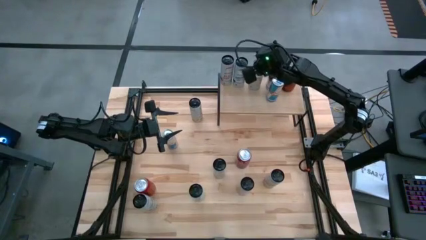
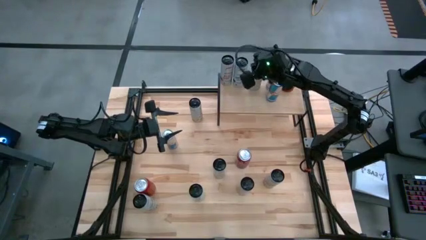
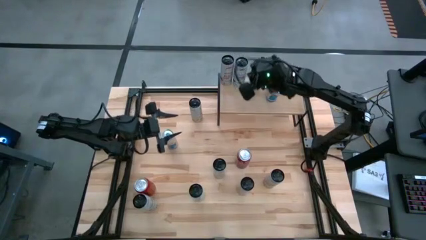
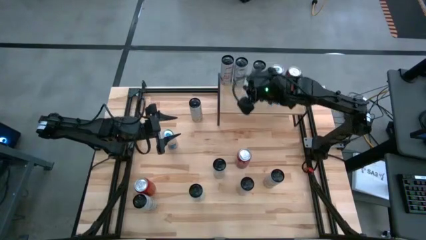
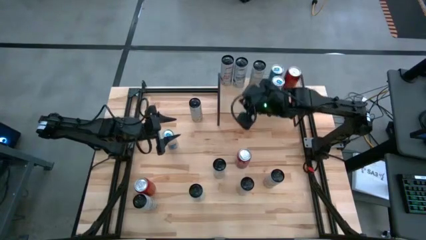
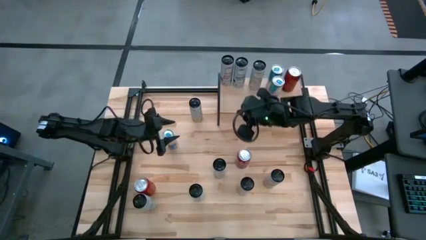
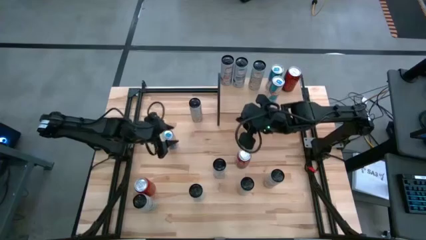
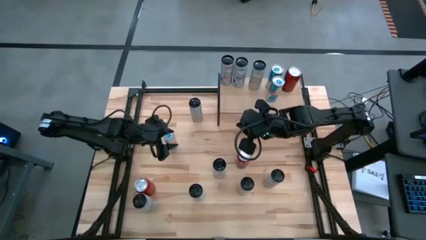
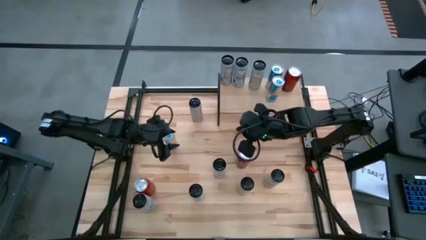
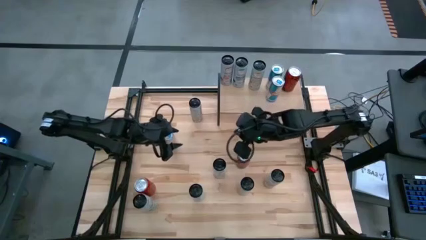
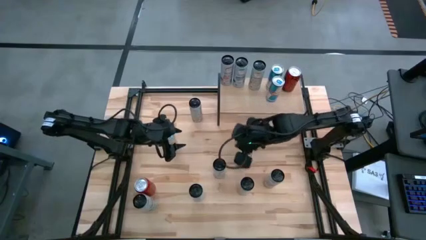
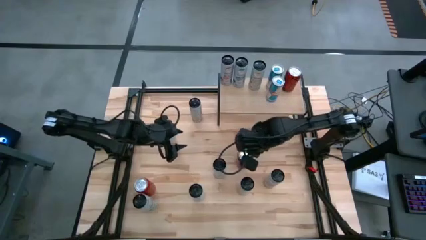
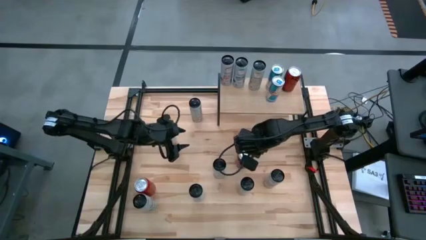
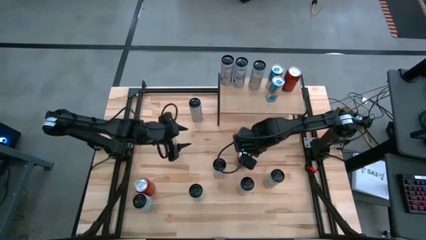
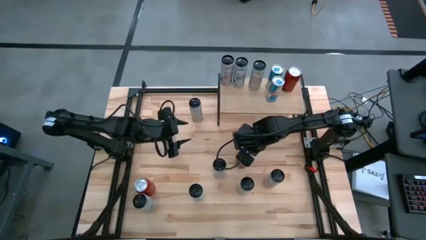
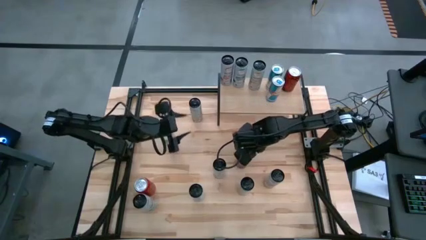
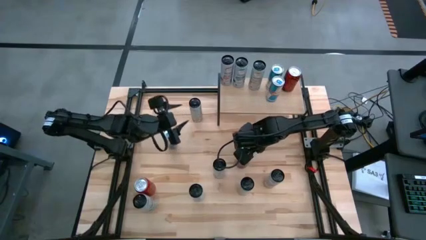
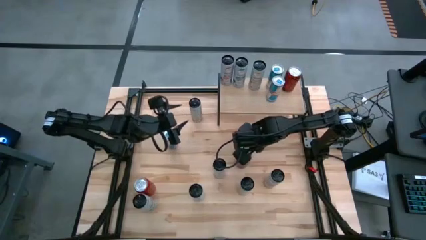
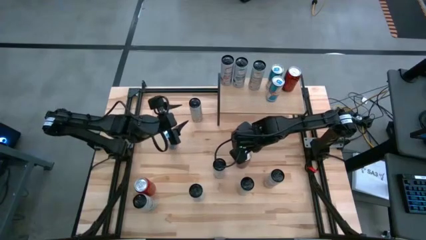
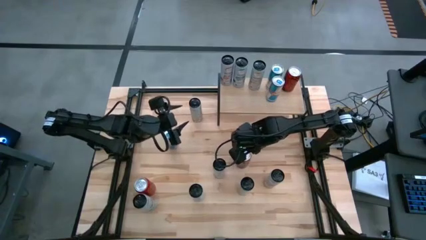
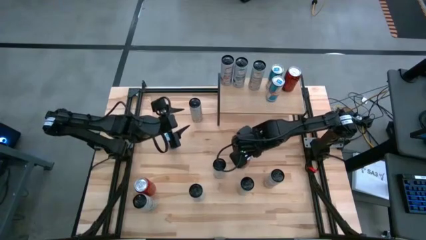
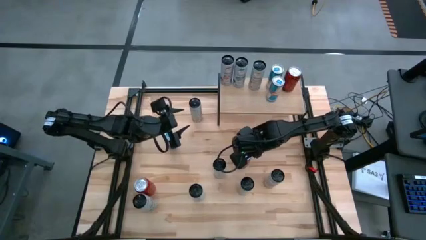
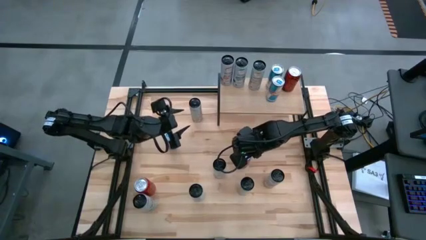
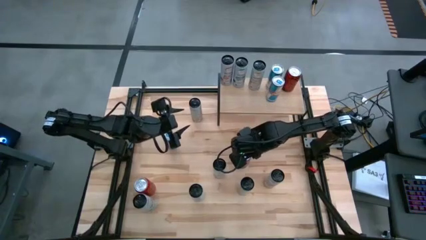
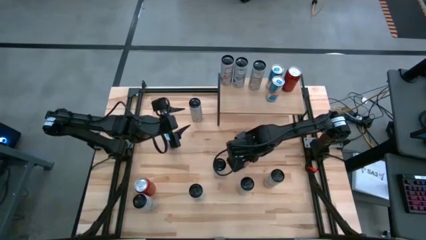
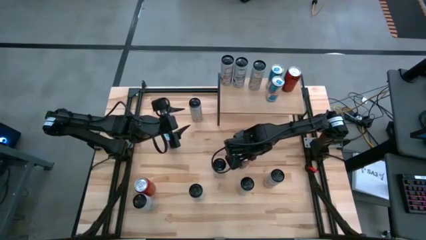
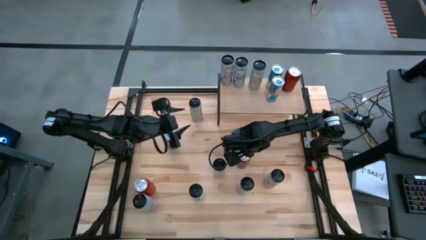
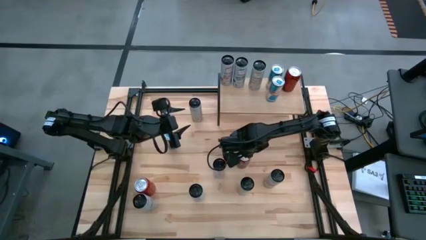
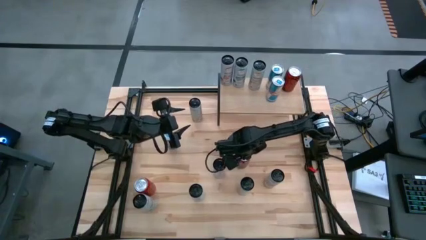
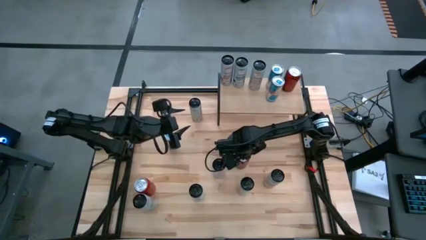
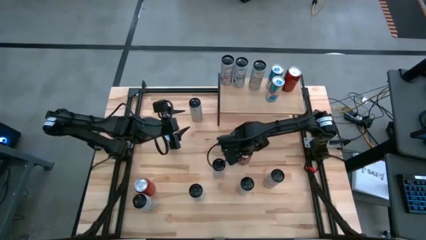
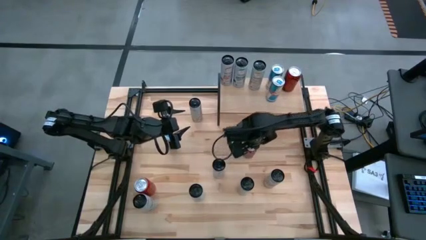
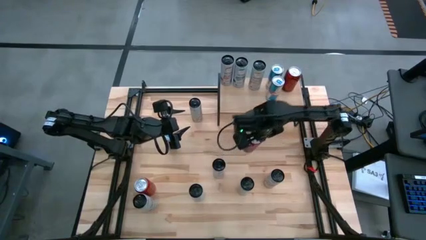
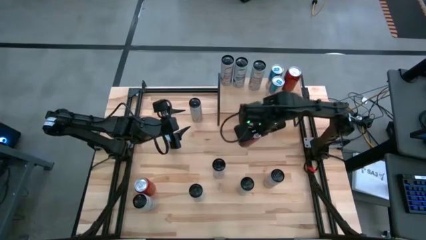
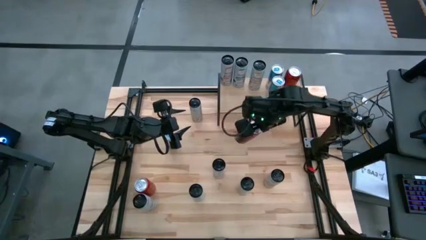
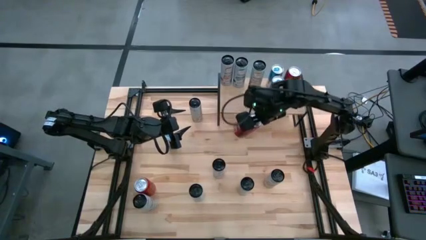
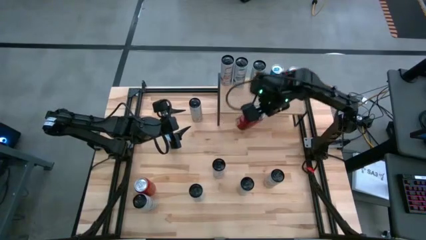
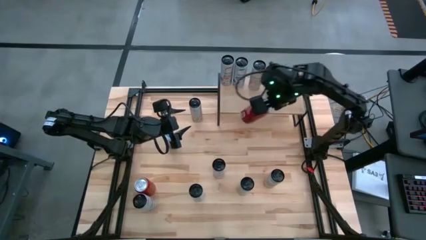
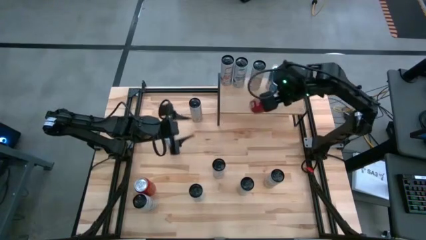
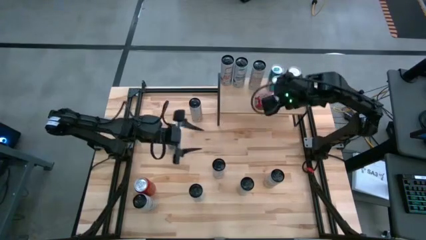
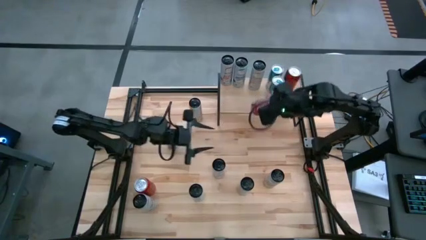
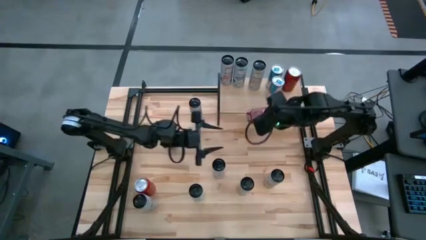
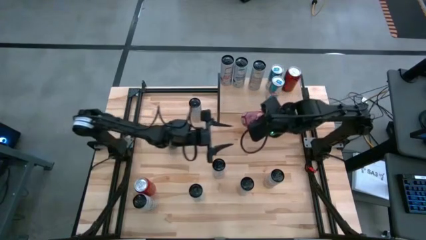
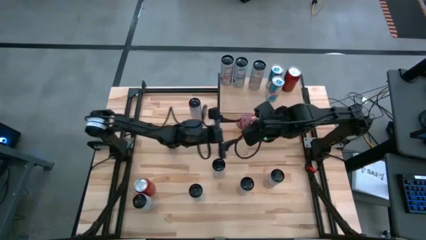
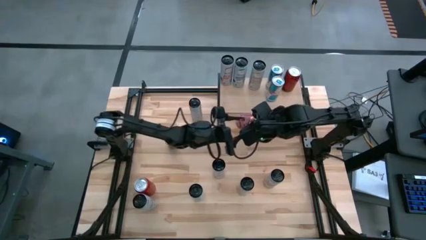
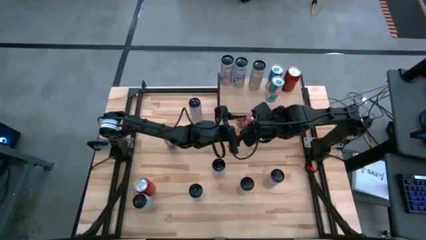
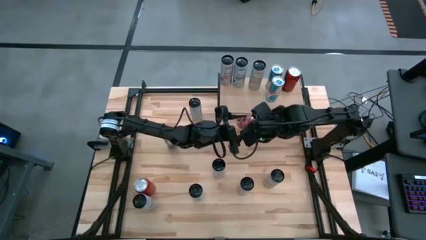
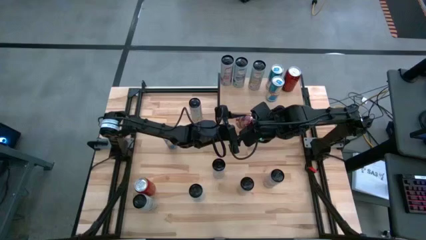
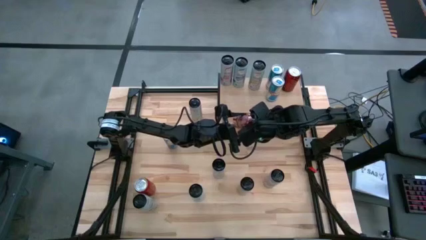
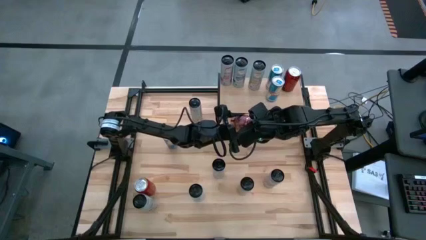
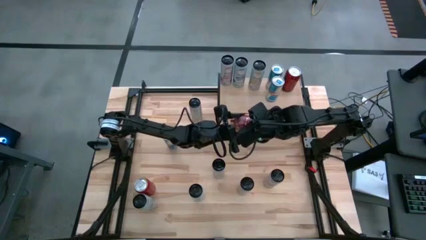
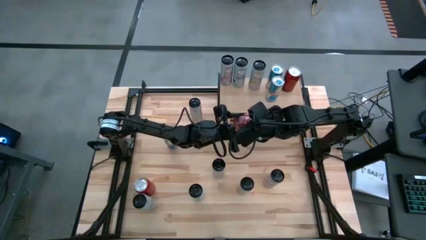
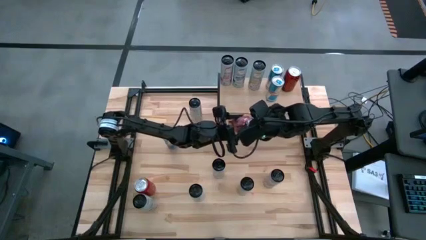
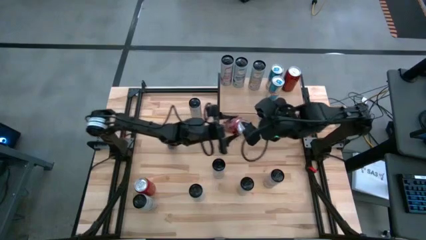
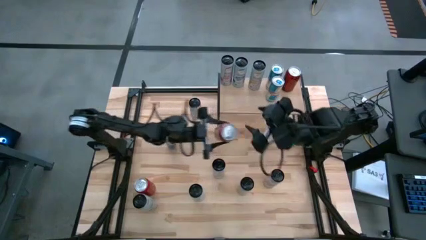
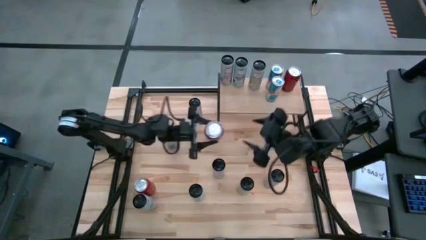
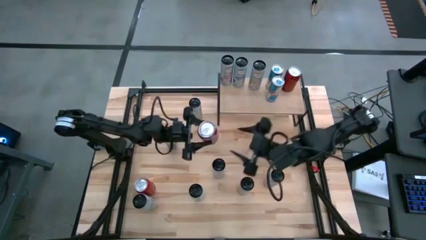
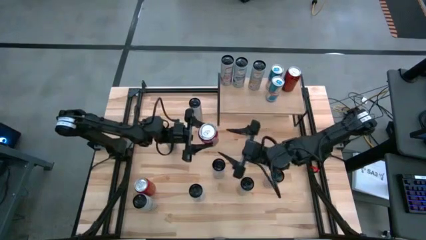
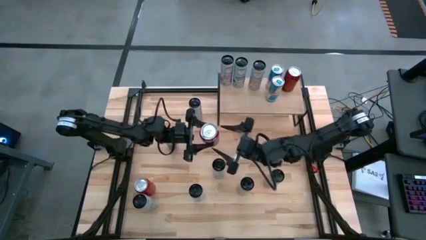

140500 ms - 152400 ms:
Task: Place canned beverage on shelf
Put the top red white soda can on the shelf aligned with the red black soda can

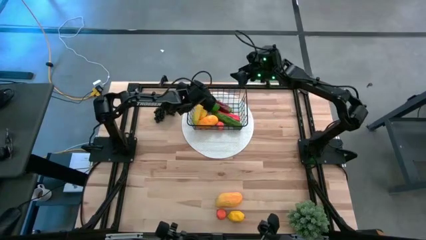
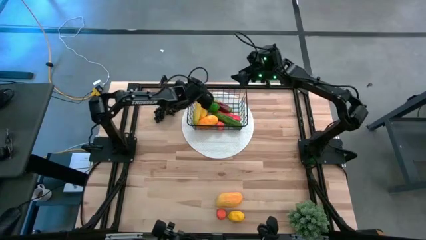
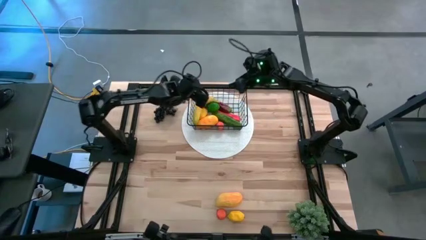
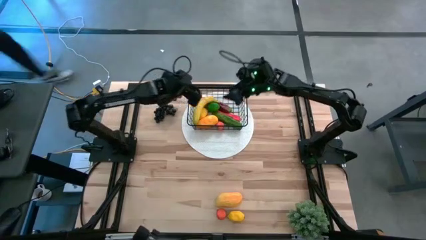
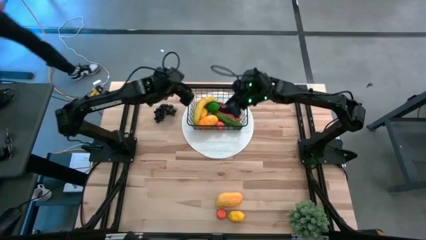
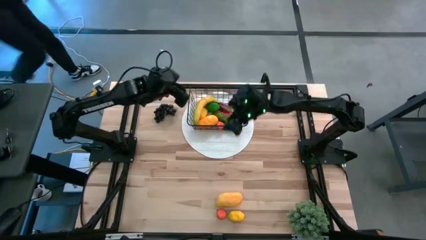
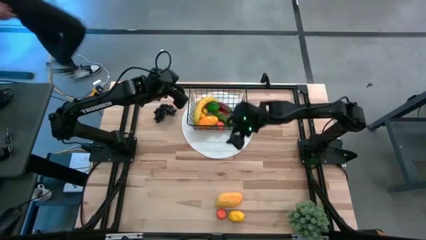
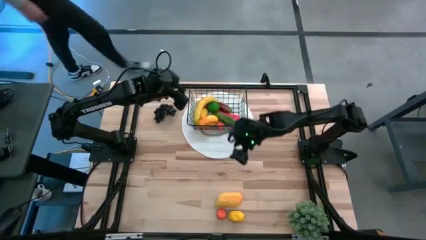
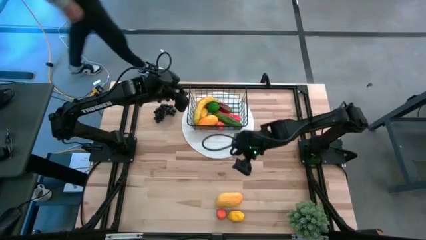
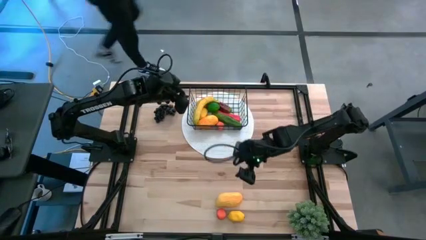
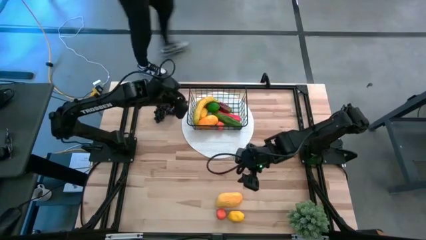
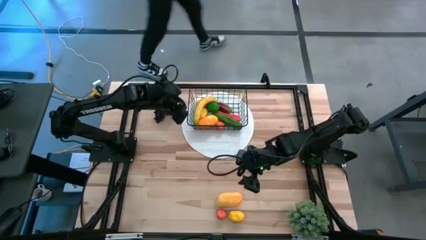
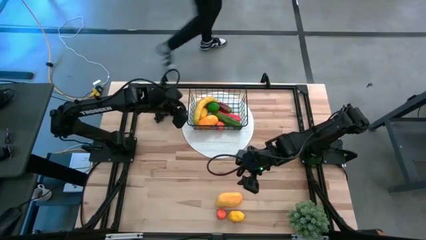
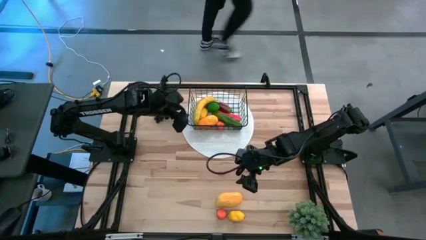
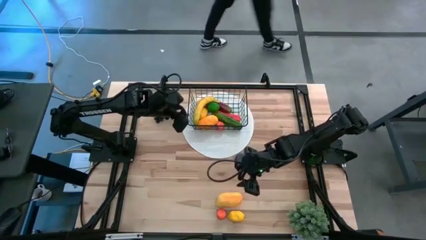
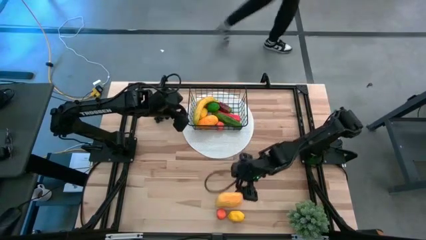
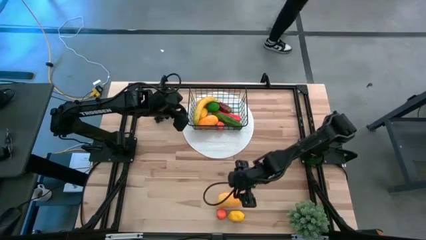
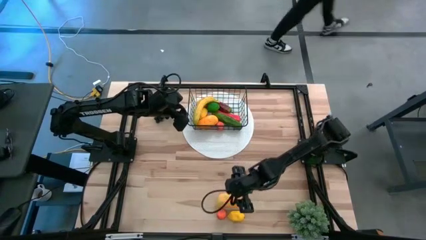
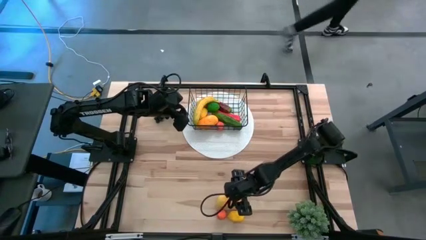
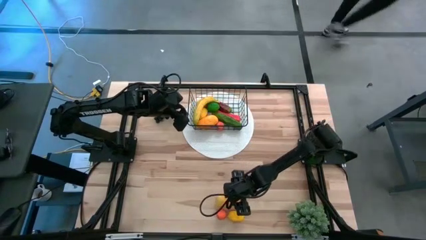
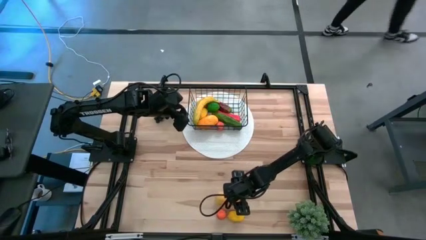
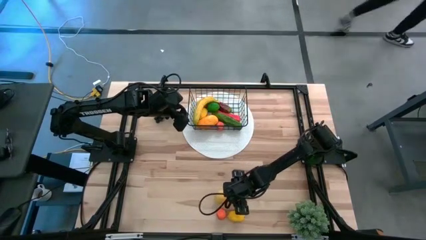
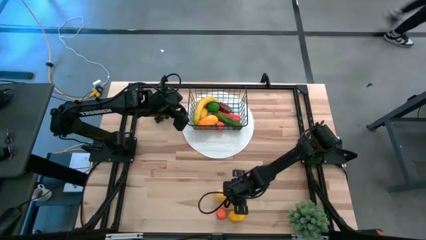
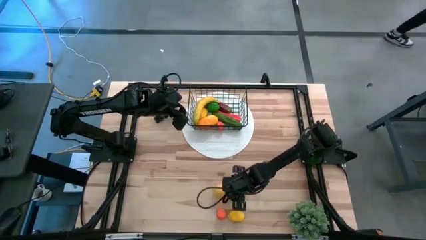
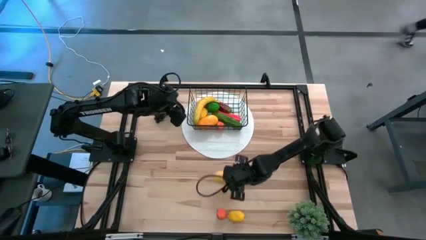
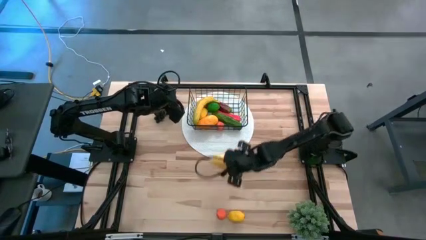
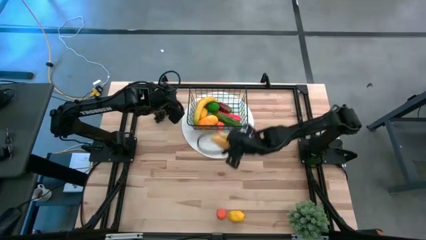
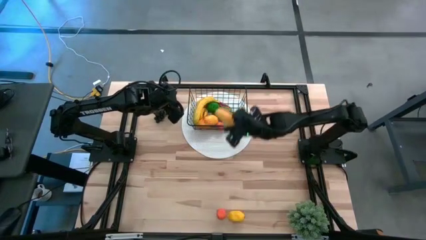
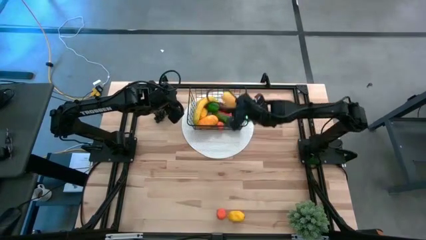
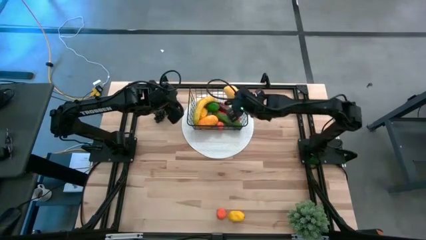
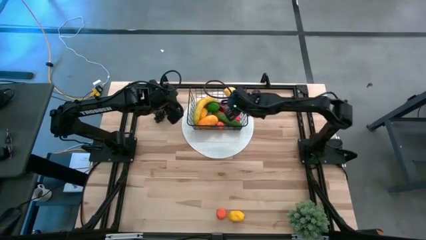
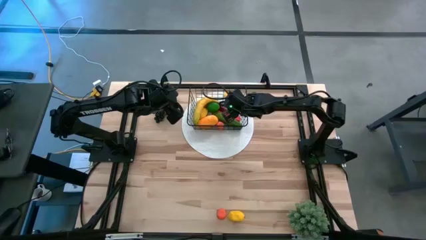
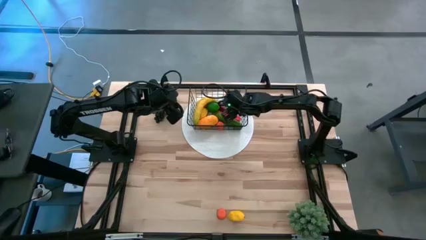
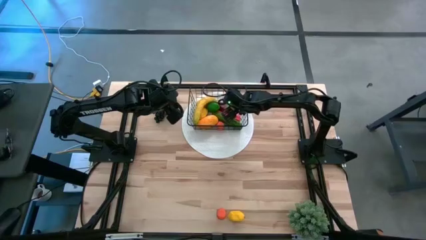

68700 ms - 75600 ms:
Task: Build produce basket
Put the yellow mango into the black wire basket
